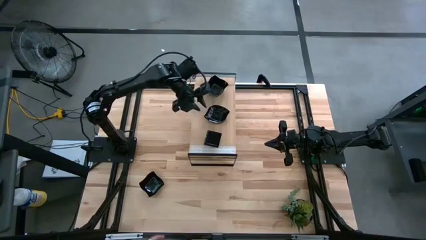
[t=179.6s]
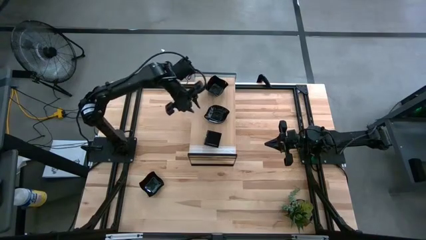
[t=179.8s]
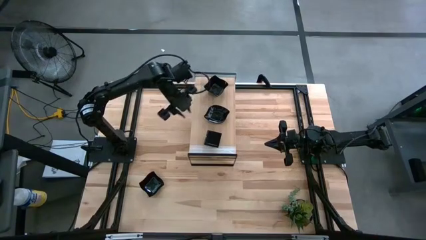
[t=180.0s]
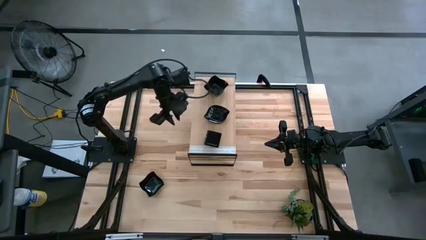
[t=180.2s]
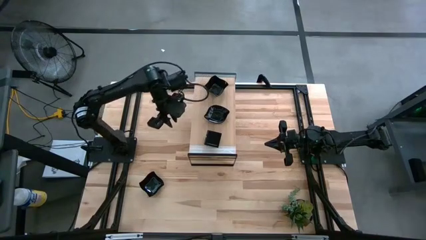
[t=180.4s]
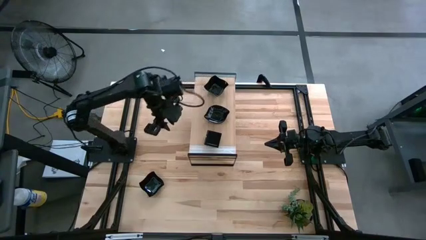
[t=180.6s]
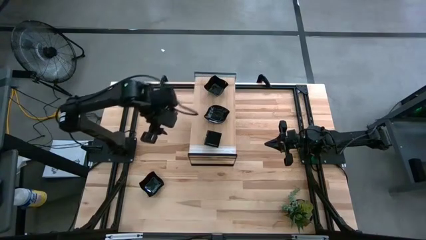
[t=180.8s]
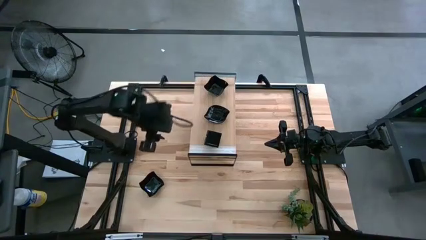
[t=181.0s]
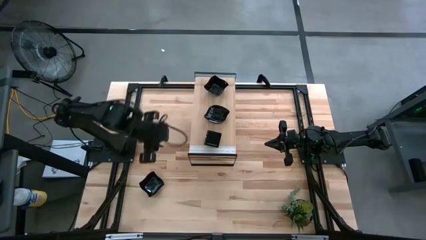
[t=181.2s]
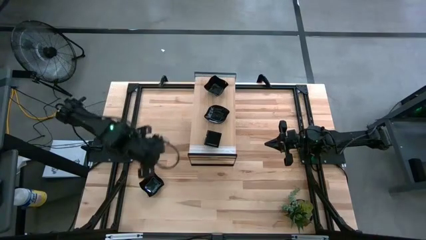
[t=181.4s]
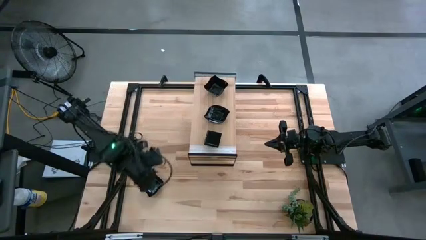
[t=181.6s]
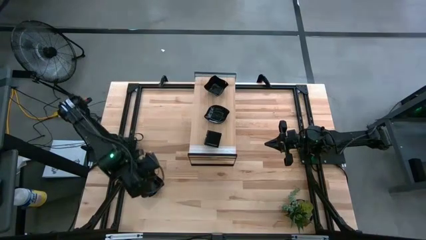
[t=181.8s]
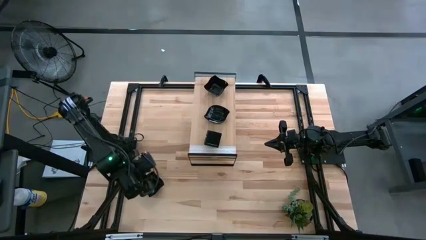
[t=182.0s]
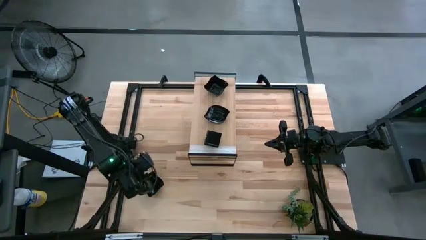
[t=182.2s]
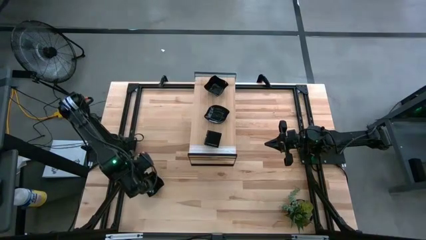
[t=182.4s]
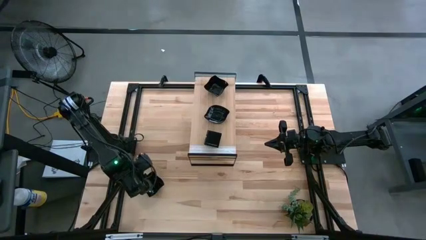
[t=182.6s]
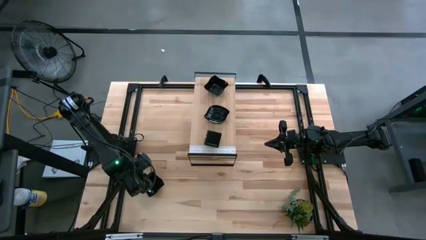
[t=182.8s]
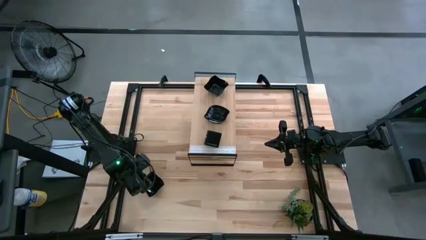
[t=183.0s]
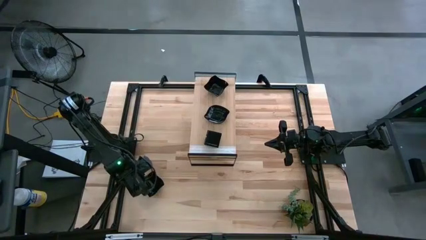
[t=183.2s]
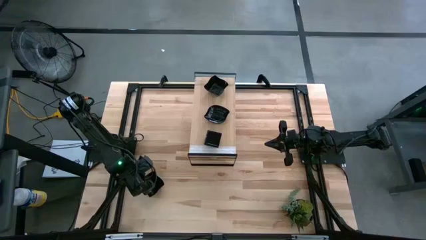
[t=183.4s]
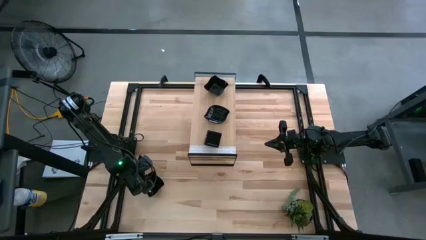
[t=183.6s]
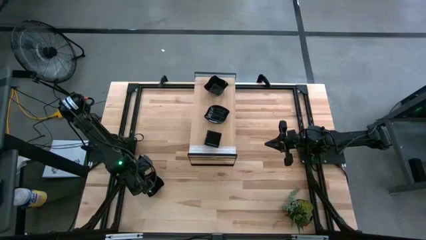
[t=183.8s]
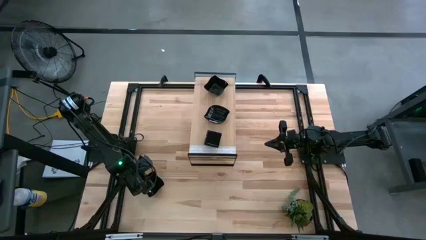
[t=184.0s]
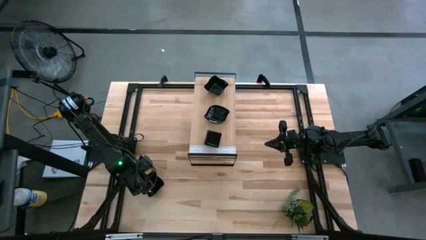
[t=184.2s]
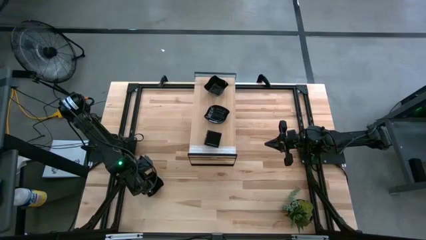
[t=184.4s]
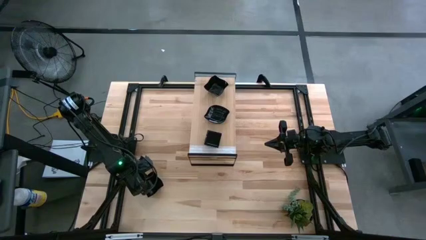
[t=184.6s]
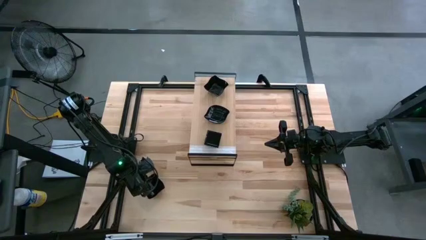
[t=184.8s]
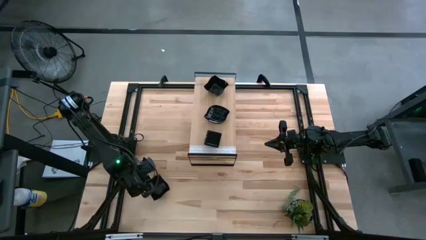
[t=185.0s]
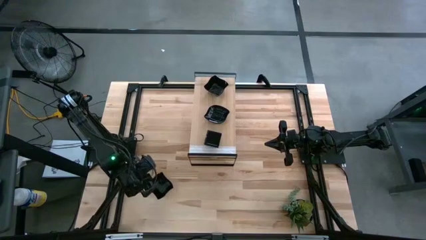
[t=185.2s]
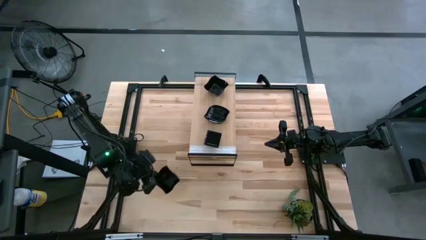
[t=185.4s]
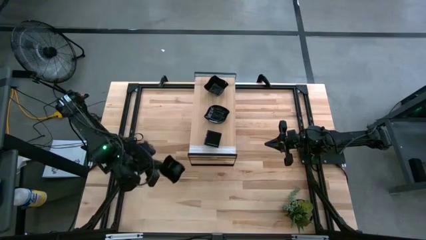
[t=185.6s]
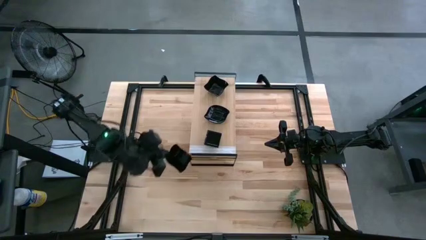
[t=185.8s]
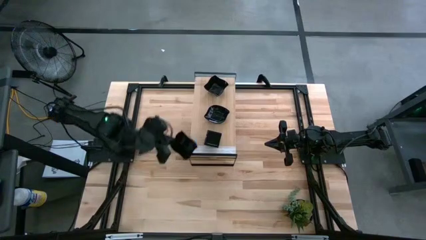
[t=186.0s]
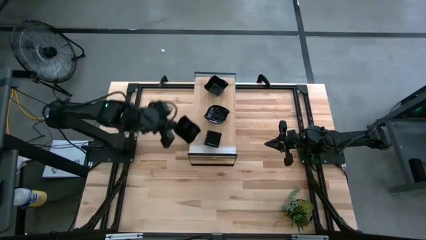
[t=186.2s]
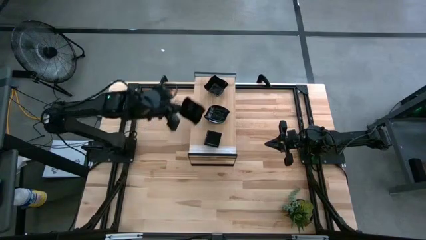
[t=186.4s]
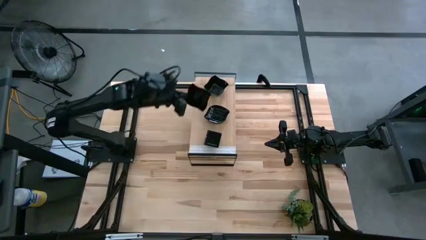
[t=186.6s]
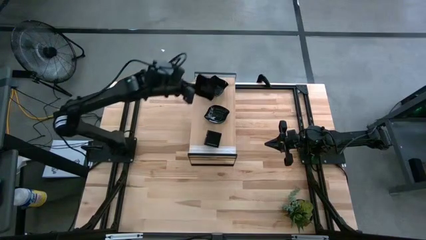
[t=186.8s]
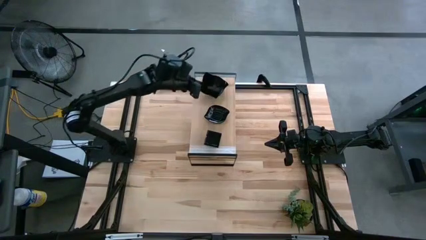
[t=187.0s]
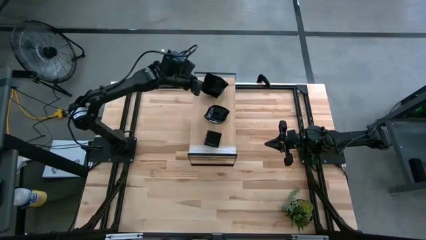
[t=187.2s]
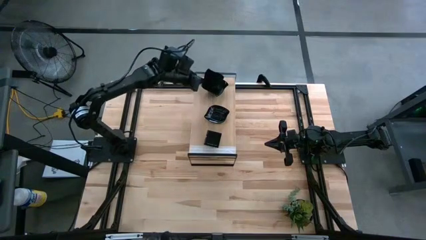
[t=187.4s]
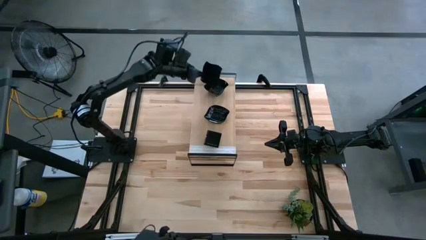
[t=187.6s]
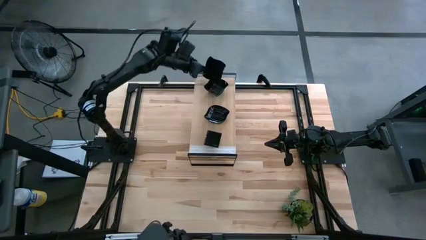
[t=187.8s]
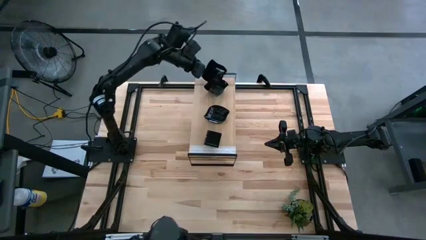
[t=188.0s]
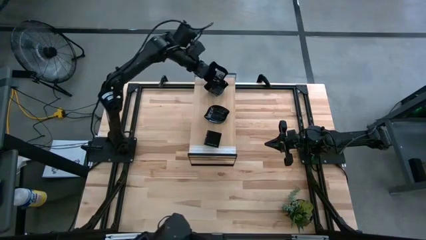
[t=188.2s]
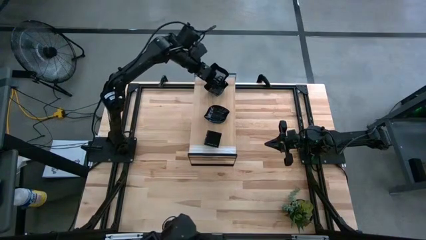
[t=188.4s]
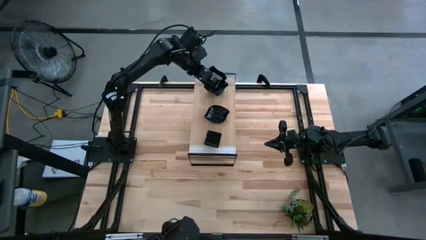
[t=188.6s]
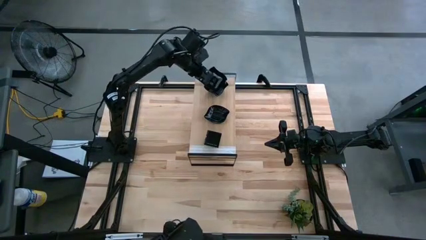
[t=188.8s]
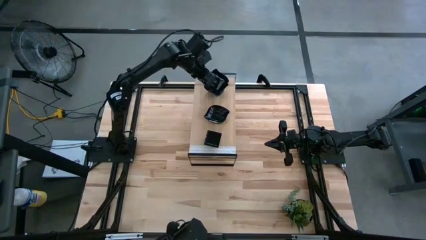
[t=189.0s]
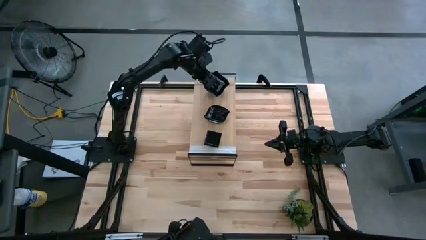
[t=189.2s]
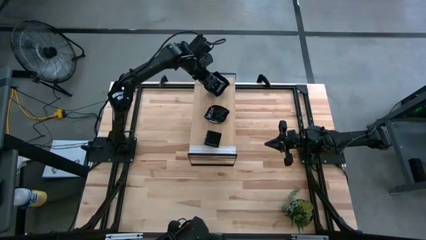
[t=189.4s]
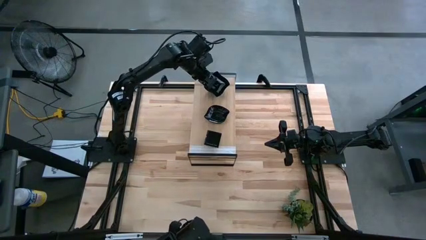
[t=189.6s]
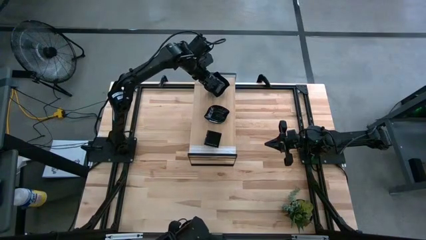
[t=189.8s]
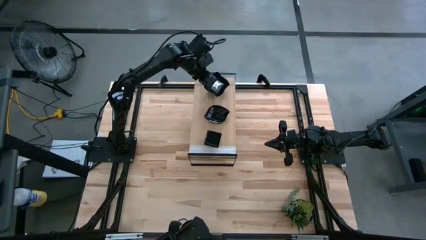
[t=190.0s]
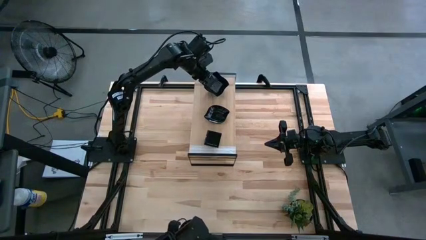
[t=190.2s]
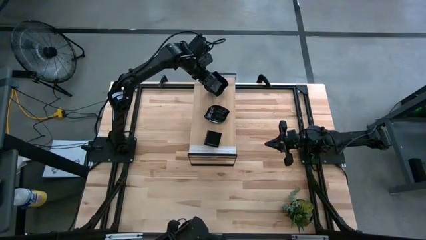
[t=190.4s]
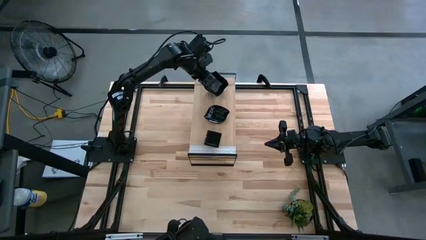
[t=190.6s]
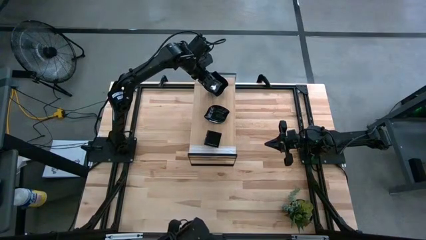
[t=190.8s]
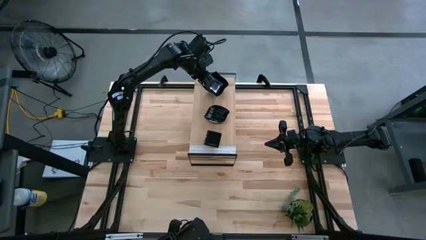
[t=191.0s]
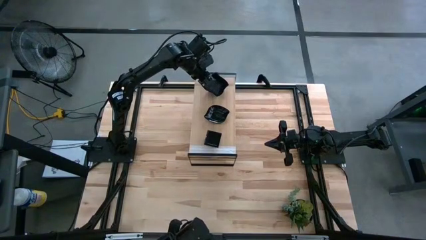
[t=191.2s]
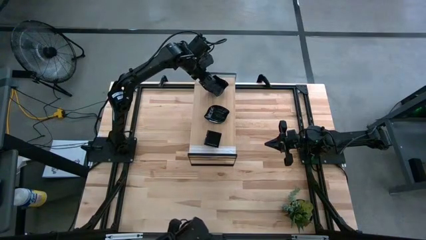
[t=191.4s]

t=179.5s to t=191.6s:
Task: Pick & Place Mini shaped plates
Stack the distorted square plate on top of the stacked distorted square plates on the shelf

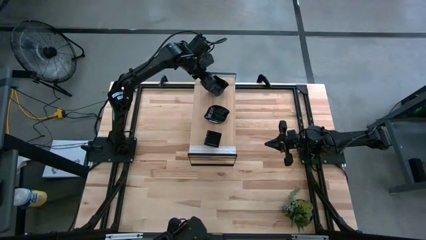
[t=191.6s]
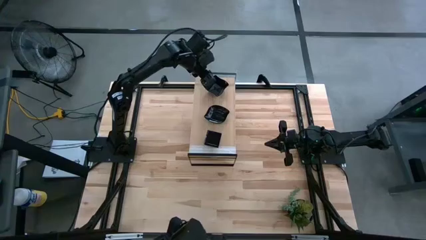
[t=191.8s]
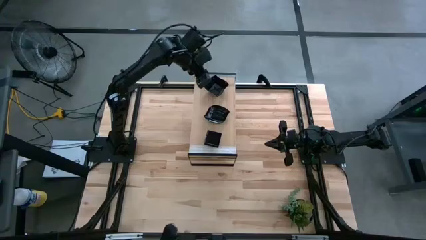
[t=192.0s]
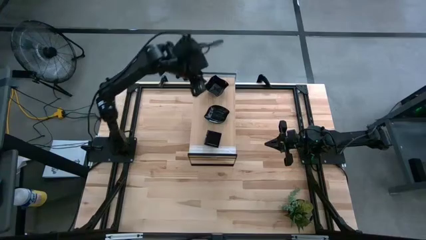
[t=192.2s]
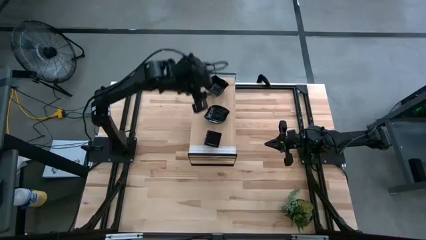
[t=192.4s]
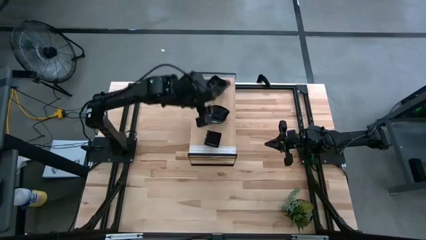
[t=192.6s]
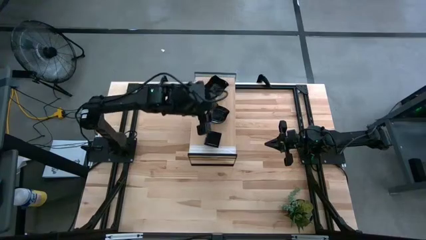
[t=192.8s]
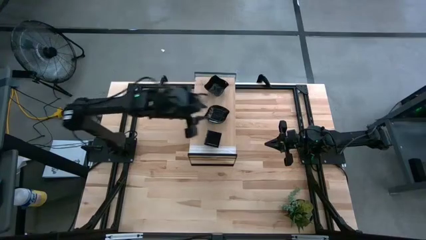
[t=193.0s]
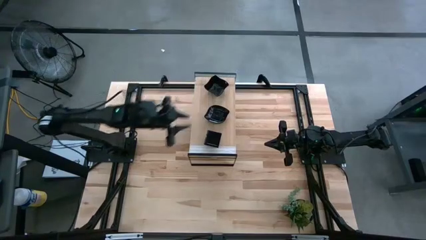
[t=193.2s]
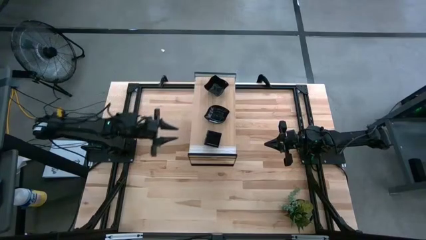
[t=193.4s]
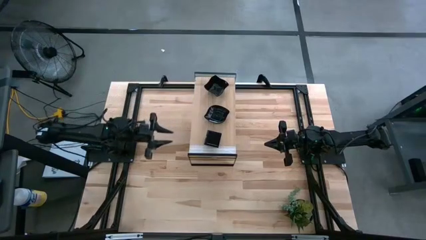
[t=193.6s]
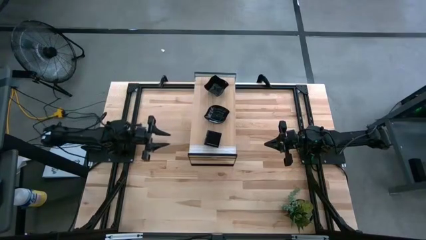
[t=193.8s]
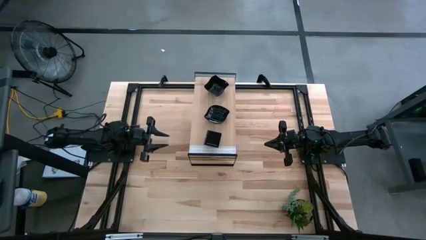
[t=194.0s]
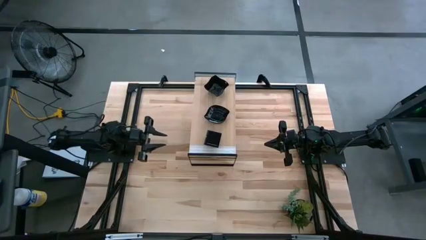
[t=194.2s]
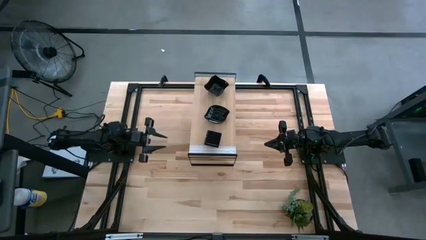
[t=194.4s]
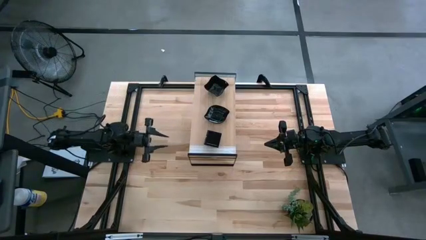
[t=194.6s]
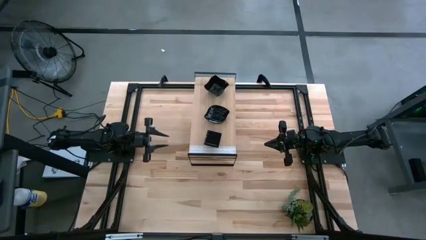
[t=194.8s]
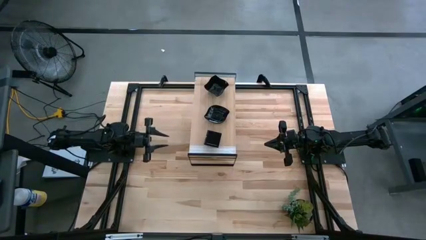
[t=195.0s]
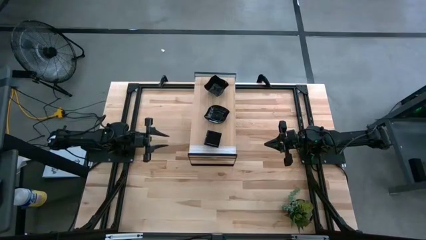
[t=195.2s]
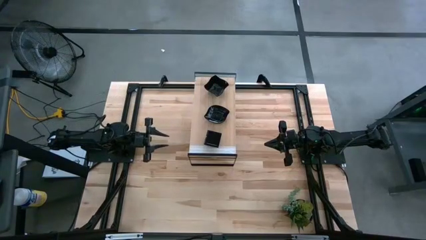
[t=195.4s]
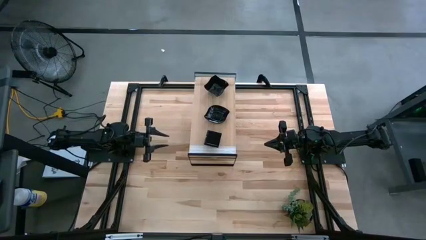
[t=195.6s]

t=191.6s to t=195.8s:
Return to Home Position
